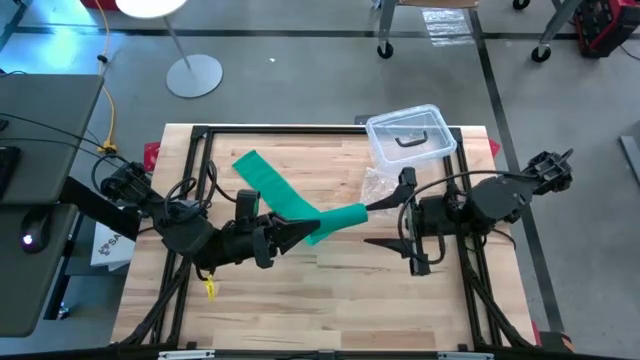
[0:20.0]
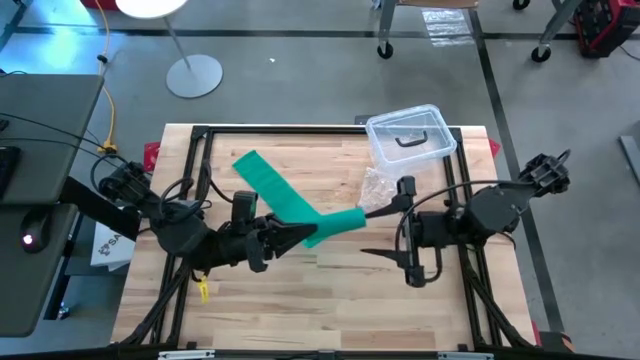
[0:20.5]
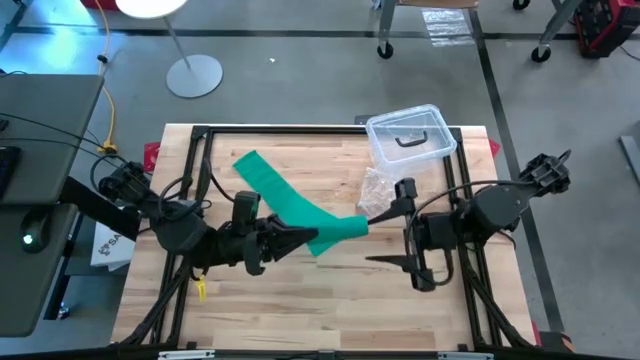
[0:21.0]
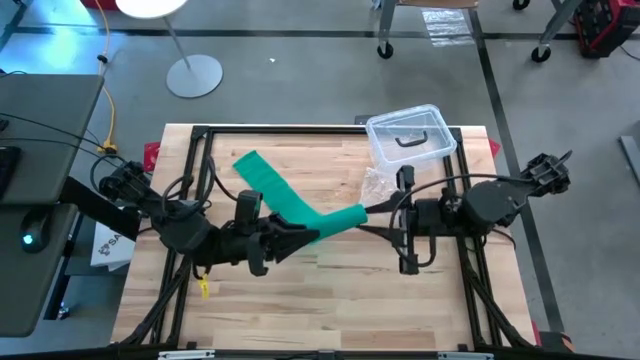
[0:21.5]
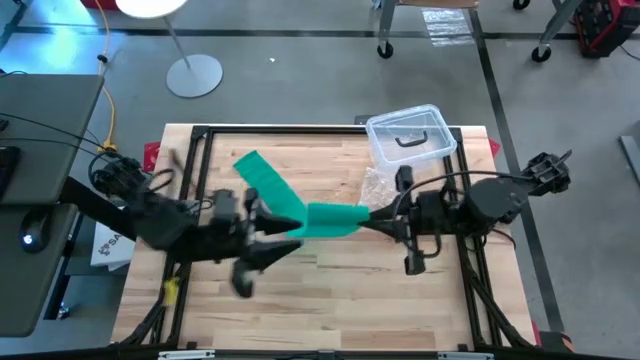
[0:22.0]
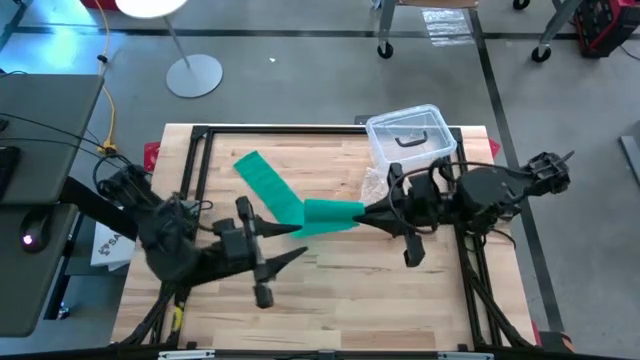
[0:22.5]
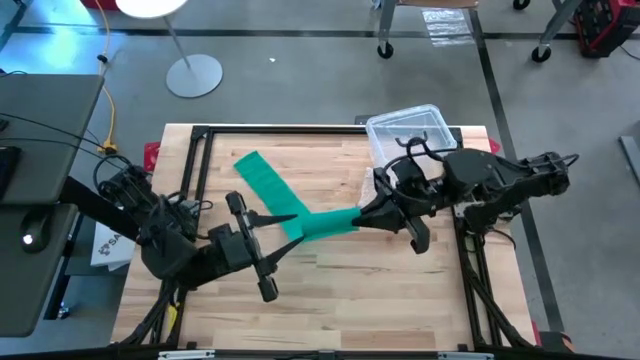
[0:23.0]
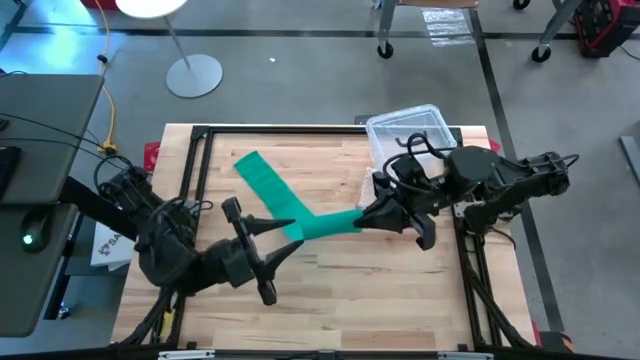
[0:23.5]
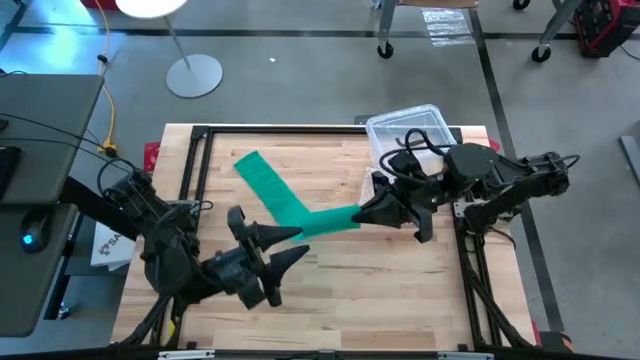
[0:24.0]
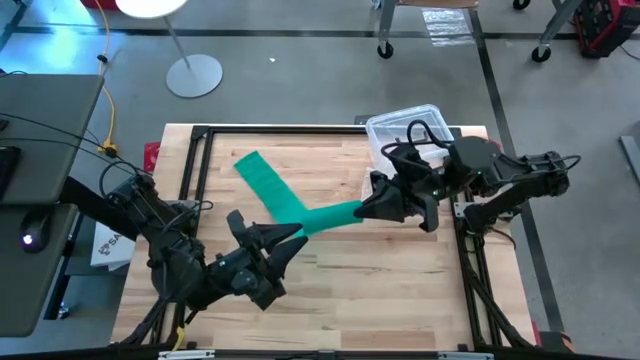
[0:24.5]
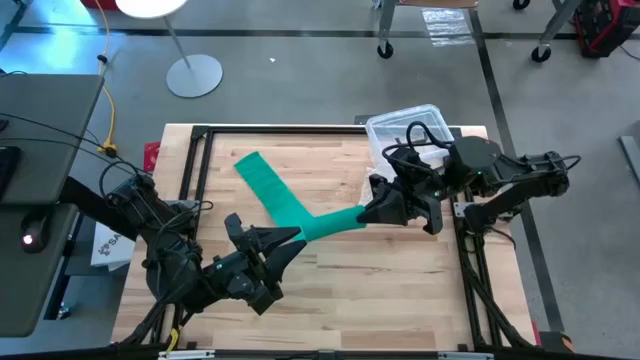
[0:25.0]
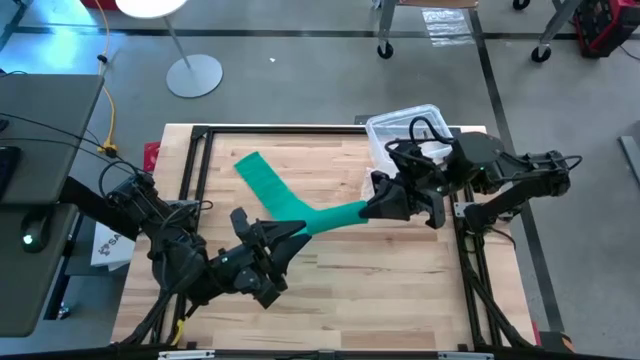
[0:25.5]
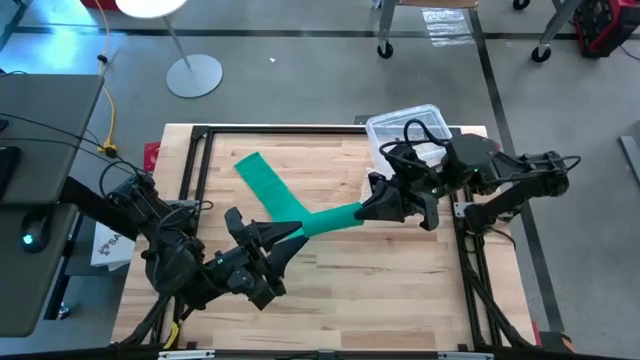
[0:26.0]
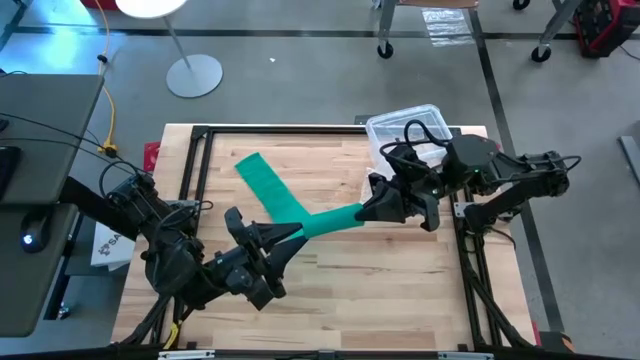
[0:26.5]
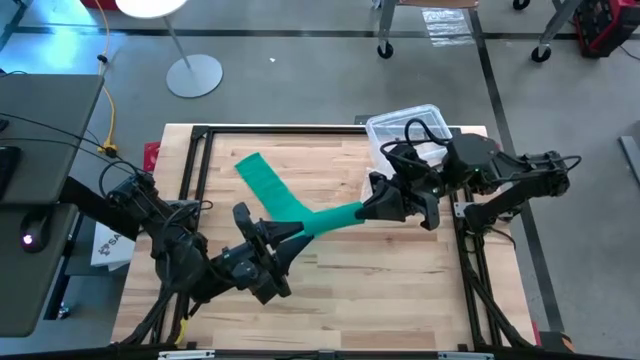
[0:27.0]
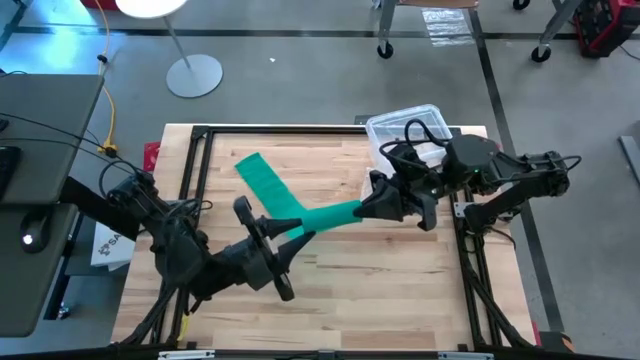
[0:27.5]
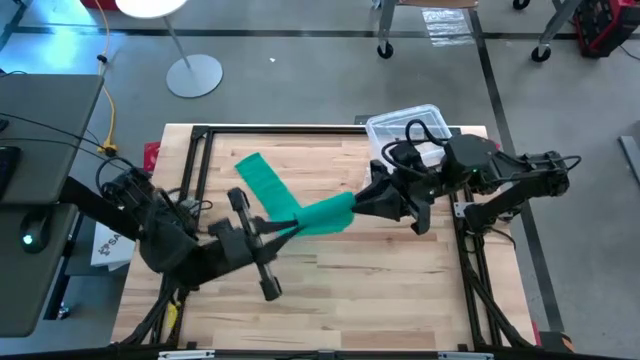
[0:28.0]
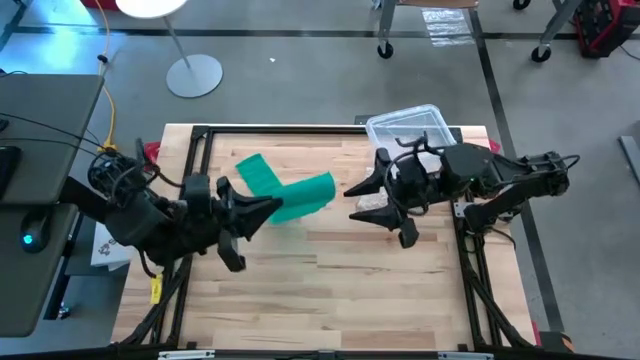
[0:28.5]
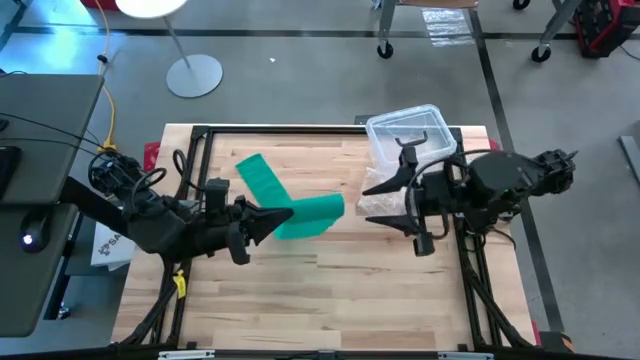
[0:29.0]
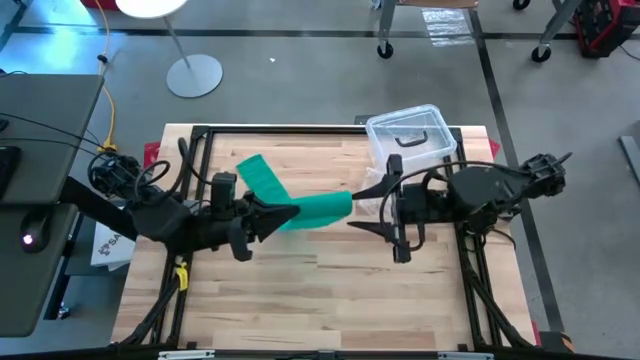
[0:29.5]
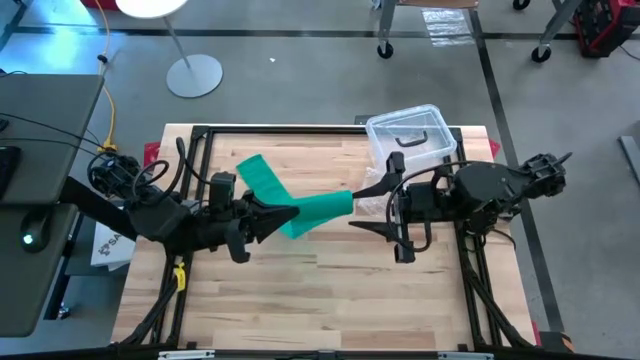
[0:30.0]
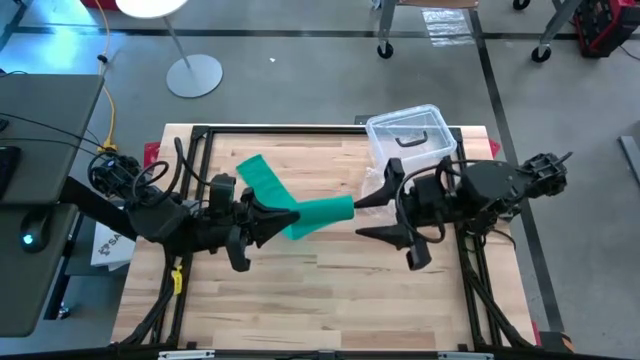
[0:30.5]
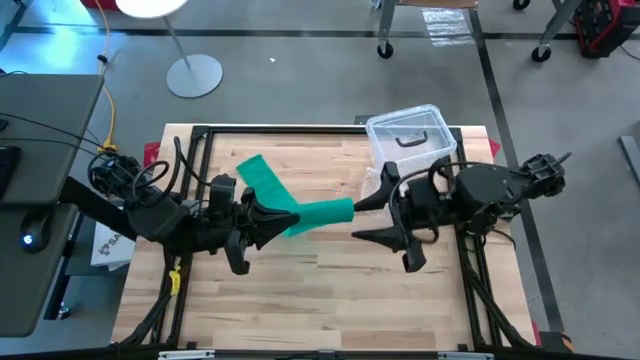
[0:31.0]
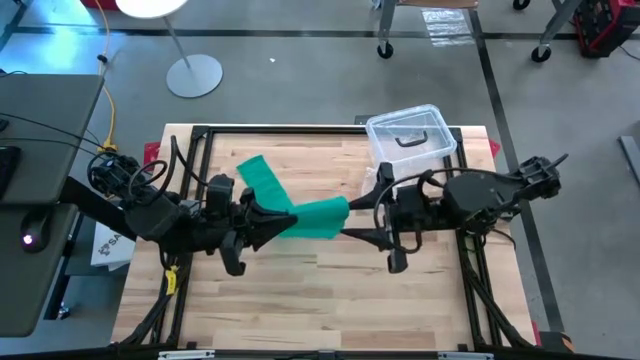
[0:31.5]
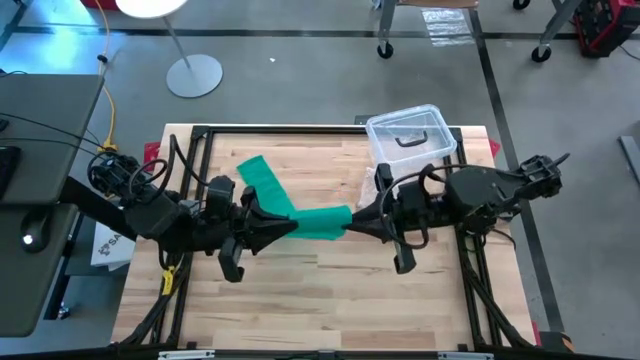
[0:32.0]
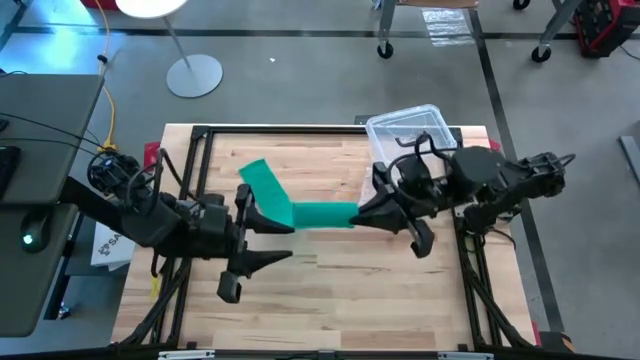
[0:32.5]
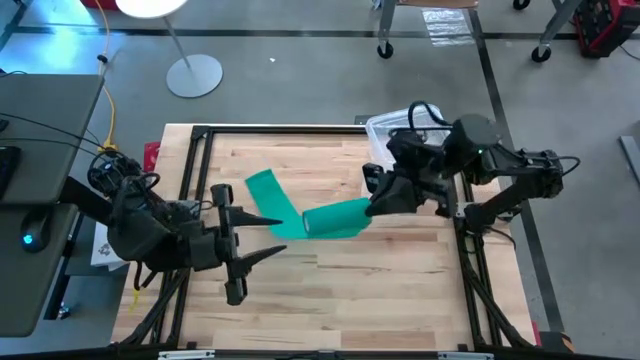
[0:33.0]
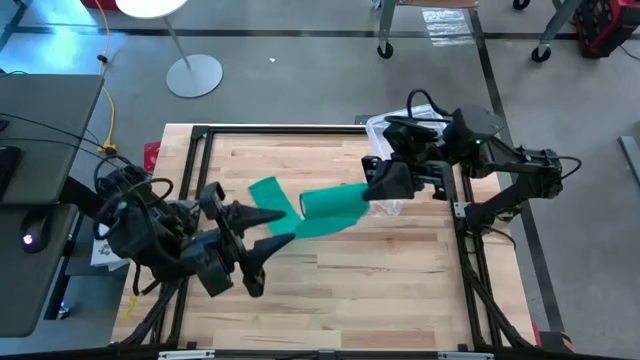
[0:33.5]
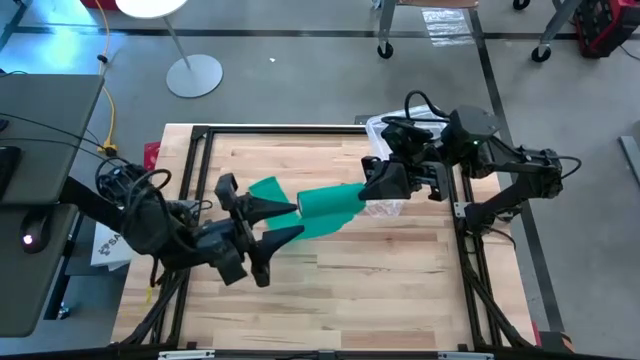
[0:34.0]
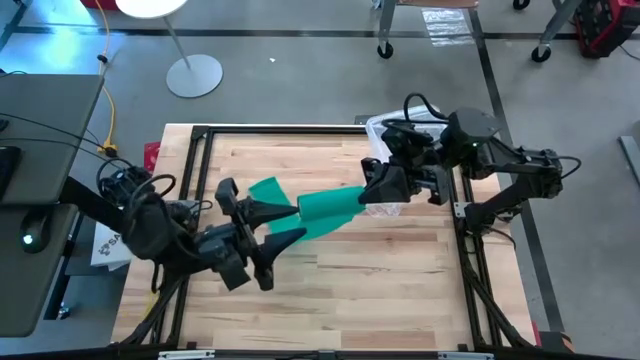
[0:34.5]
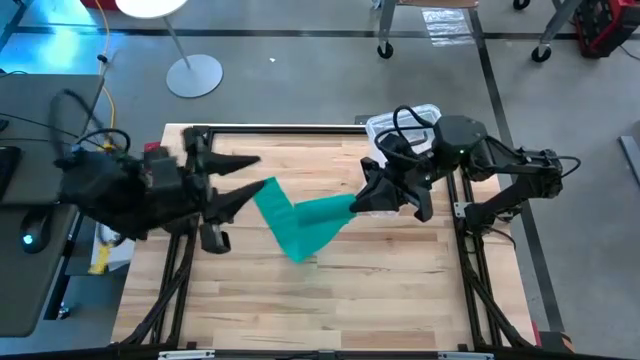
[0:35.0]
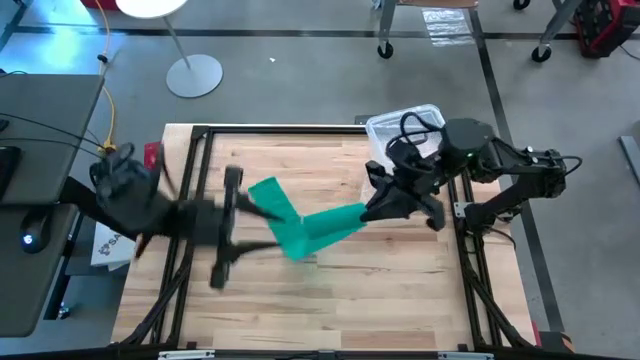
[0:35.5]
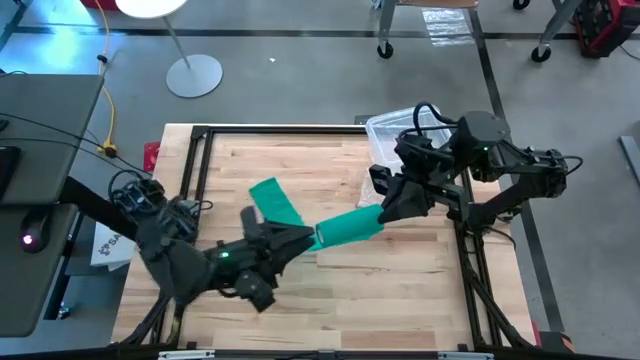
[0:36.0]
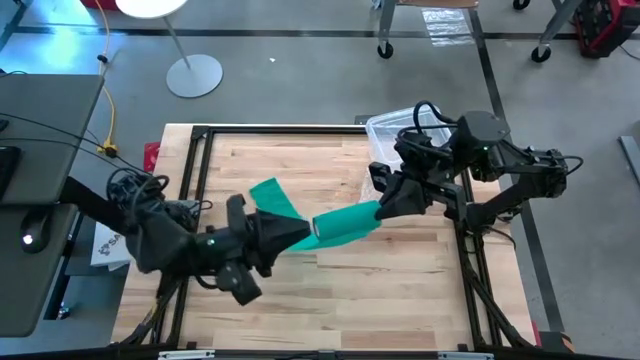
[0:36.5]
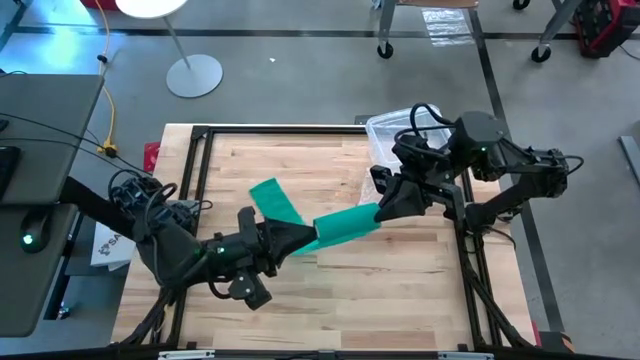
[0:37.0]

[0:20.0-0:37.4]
Task: Roll bandage
Roll the green bandage

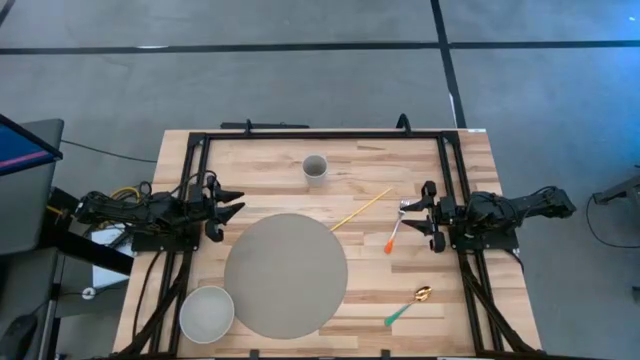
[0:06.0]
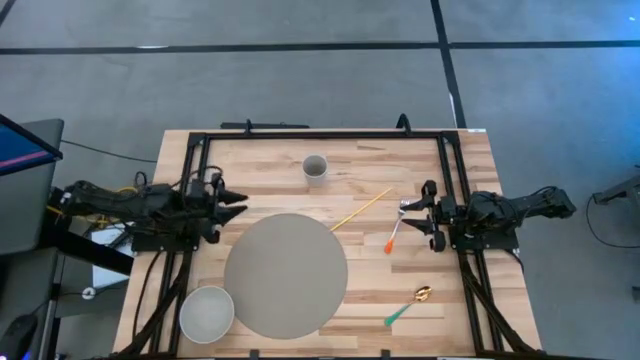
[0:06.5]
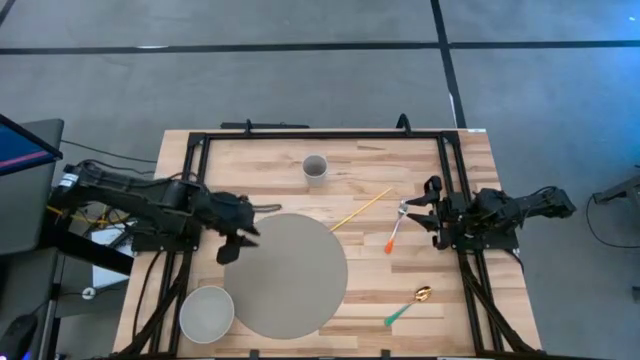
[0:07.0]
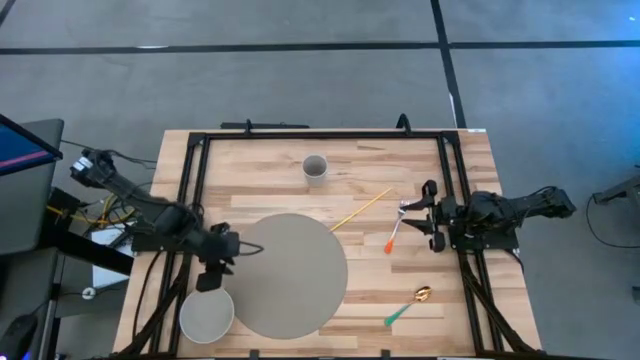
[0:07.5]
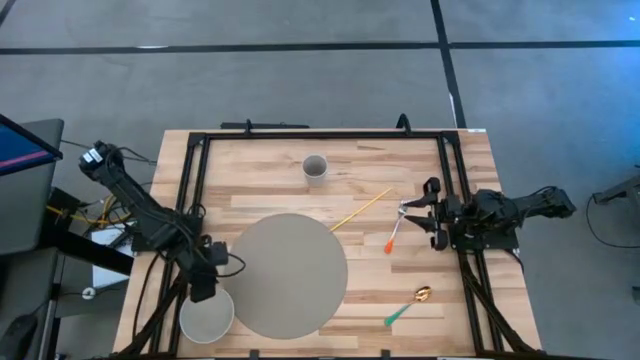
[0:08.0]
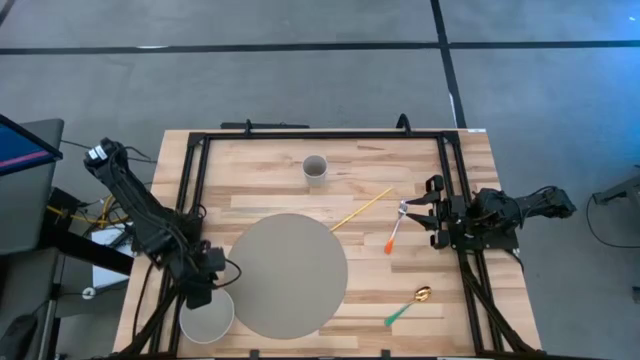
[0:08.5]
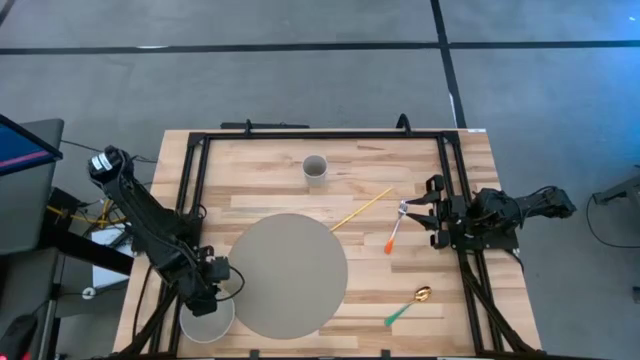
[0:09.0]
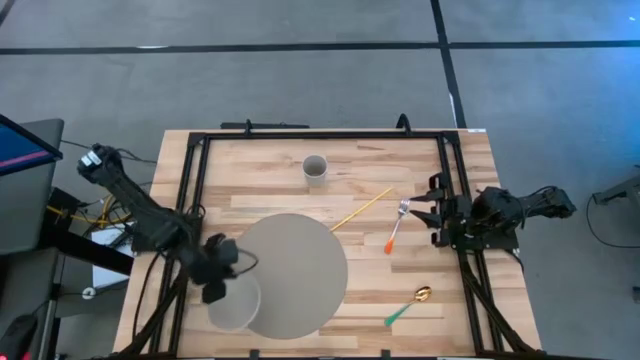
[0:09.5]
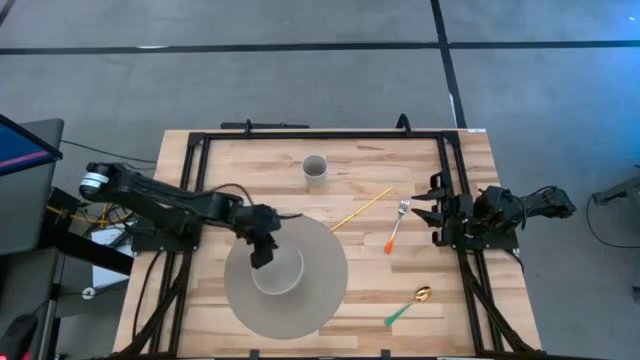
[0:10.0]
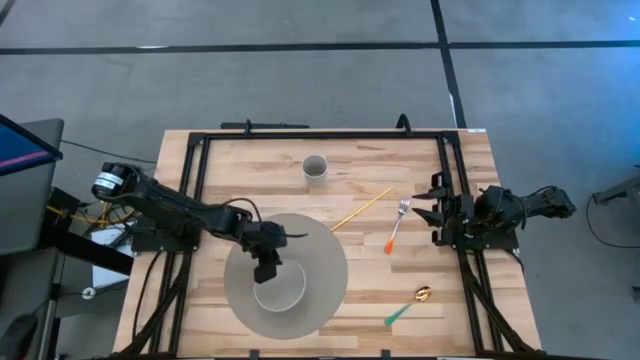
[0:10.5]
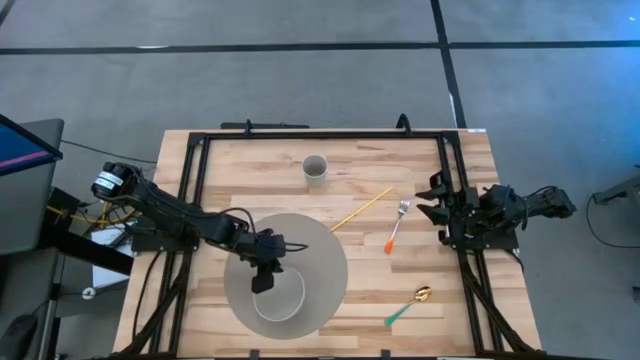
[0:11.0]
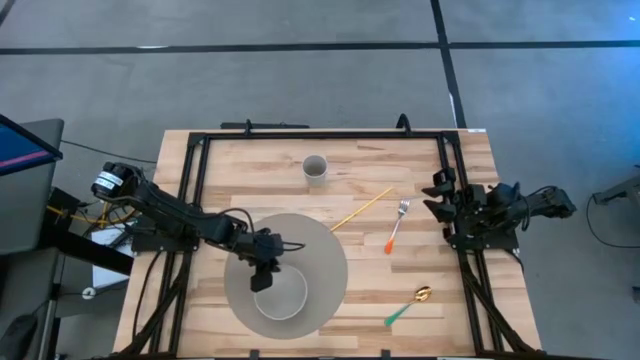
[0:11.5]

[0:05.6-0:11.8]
Task: Pick & Place Utensil
Put the white bowl on the gray mat
